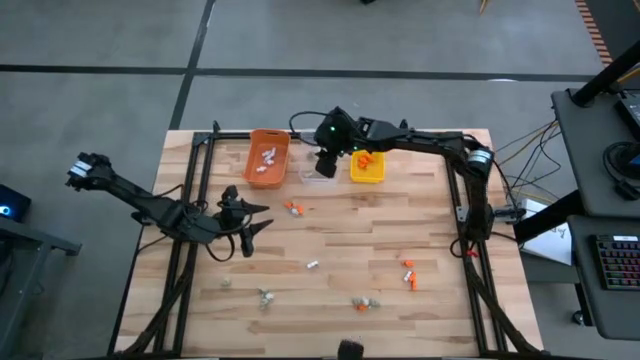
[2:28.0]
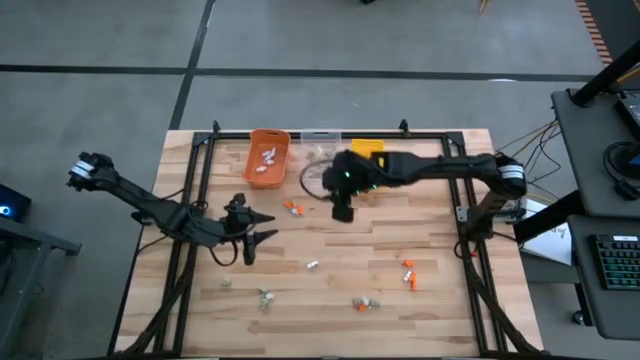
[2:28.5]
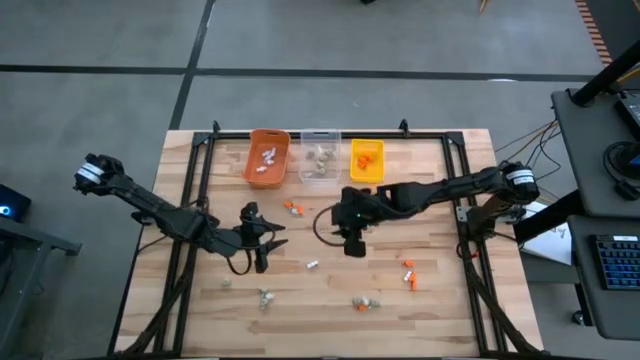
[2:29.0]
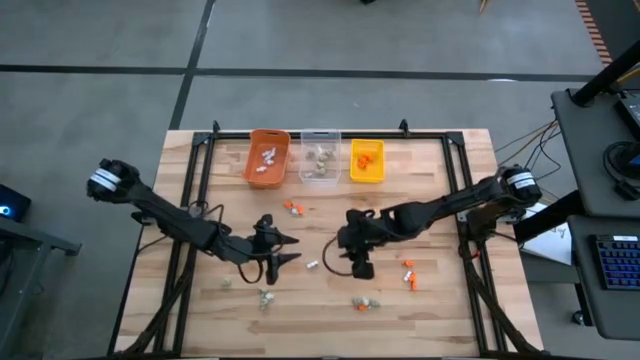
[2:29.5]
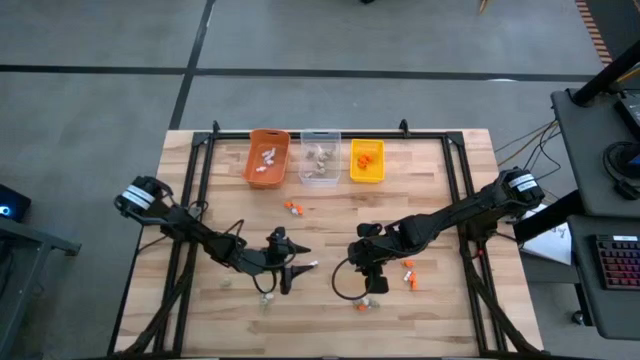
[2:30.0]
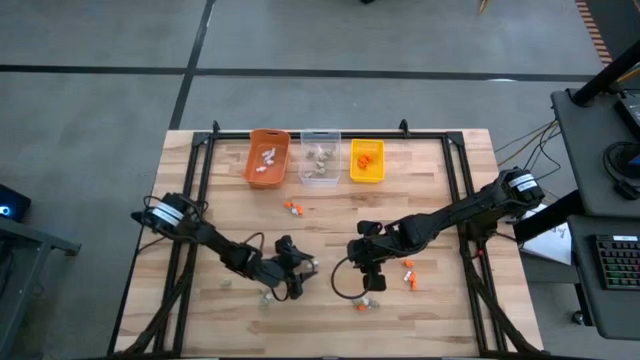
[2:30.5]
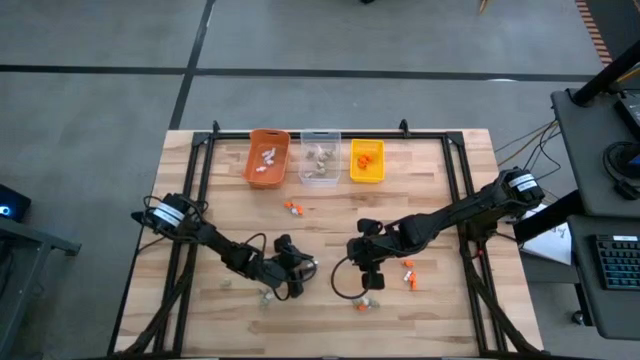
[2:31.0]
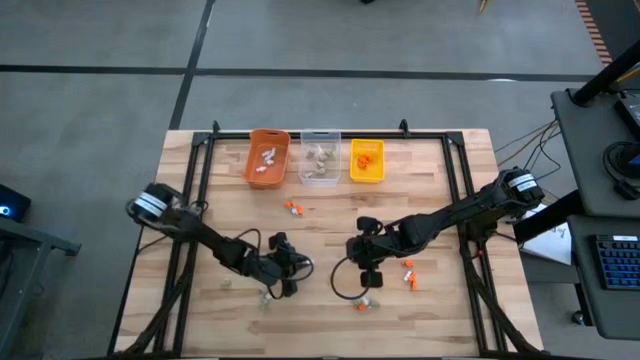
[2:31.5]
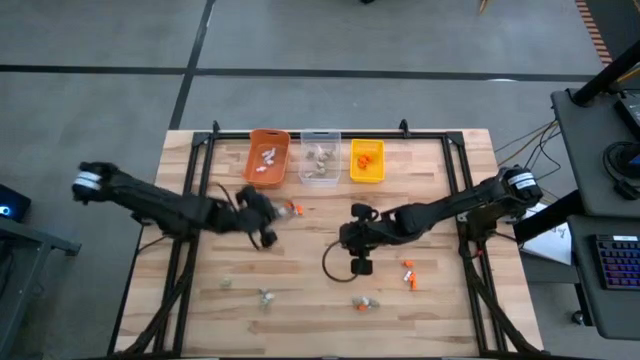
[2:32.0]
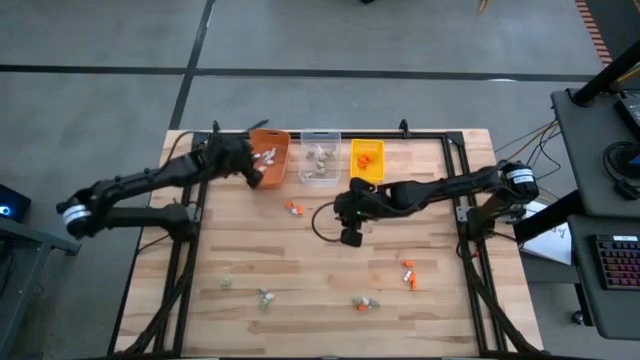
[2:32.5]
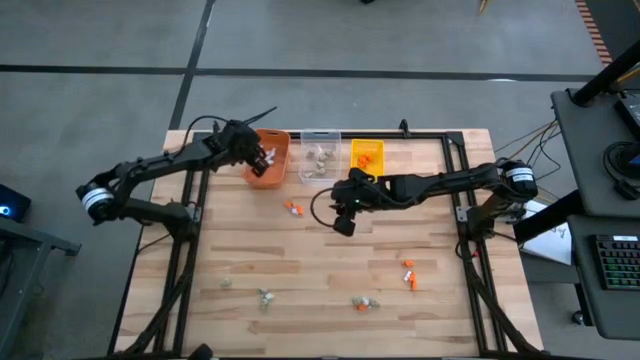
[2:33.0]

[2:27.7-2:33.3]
Task: Sort Halloween decoration
Put the white skeleton toy into the orange bin

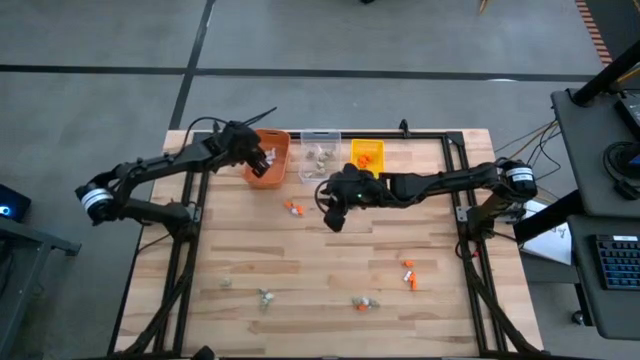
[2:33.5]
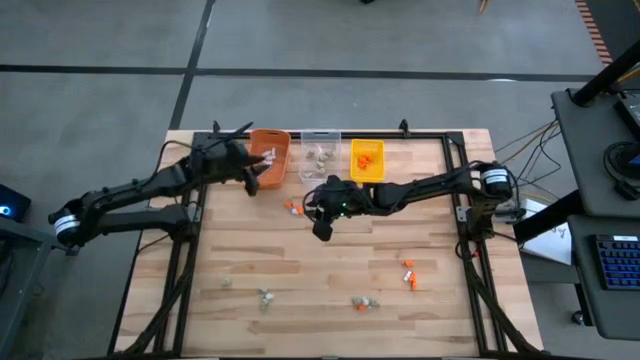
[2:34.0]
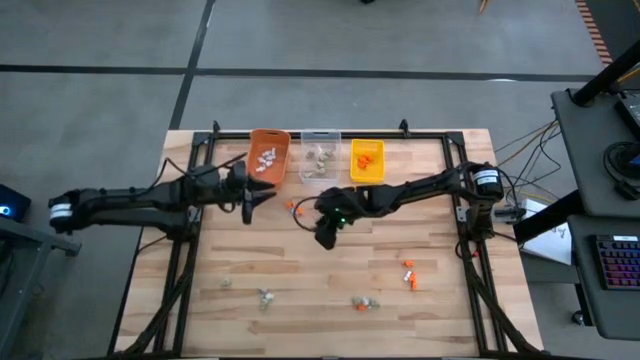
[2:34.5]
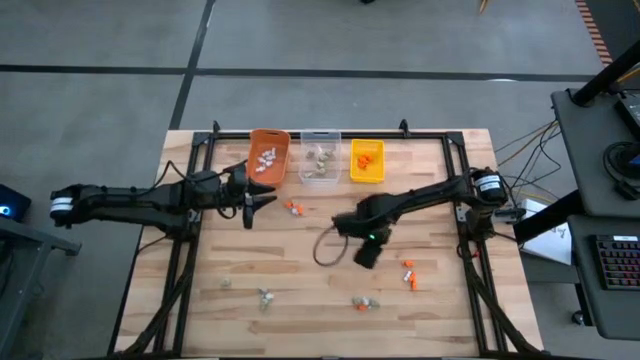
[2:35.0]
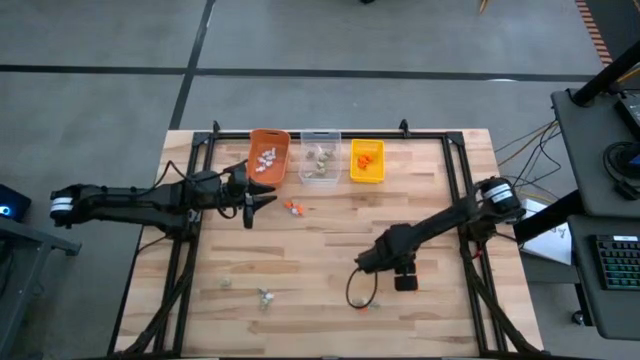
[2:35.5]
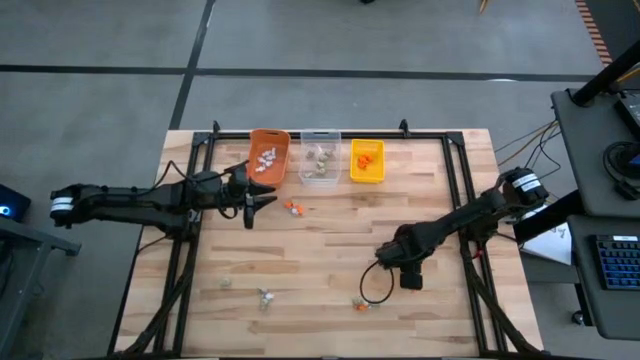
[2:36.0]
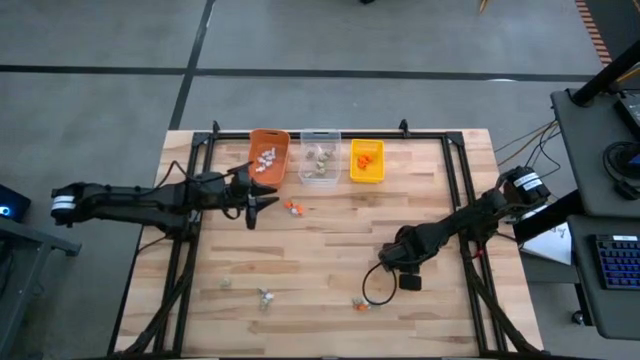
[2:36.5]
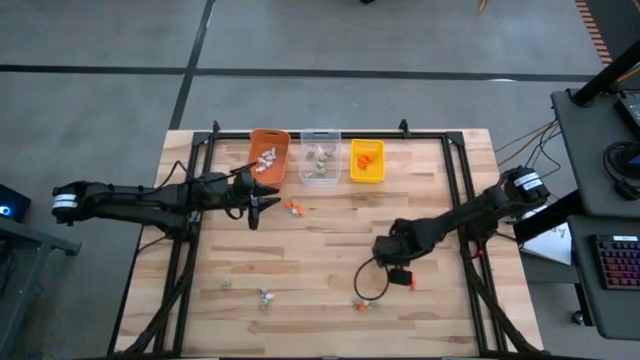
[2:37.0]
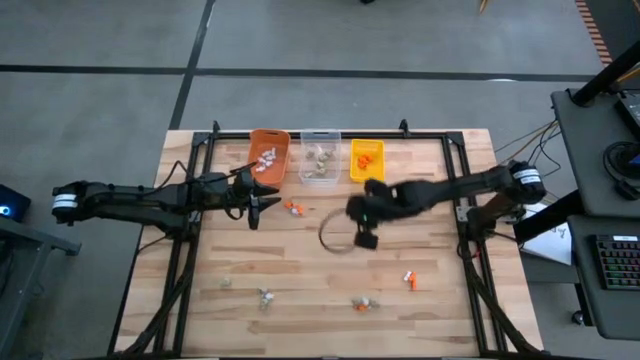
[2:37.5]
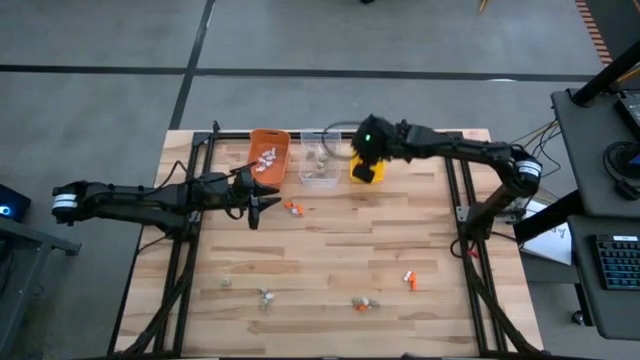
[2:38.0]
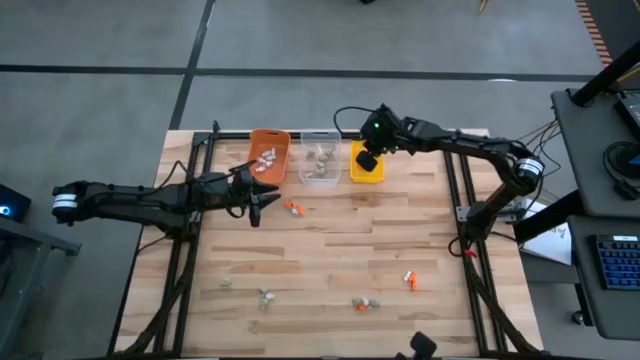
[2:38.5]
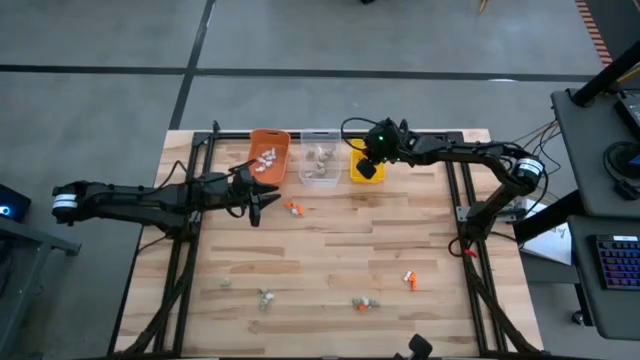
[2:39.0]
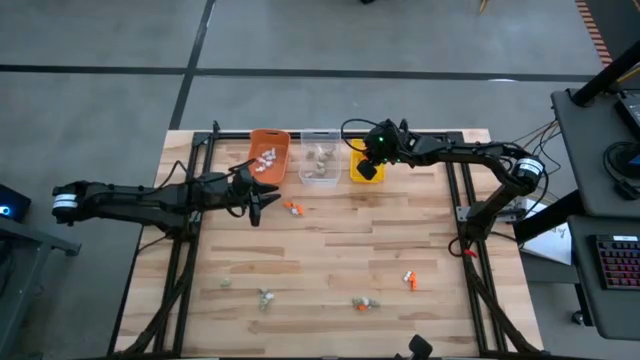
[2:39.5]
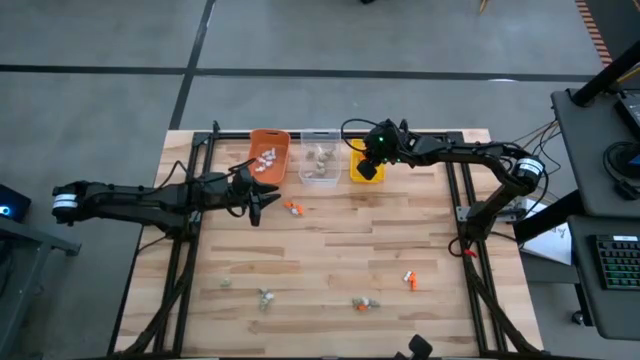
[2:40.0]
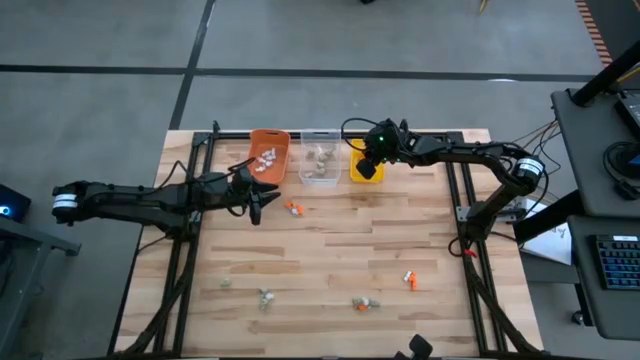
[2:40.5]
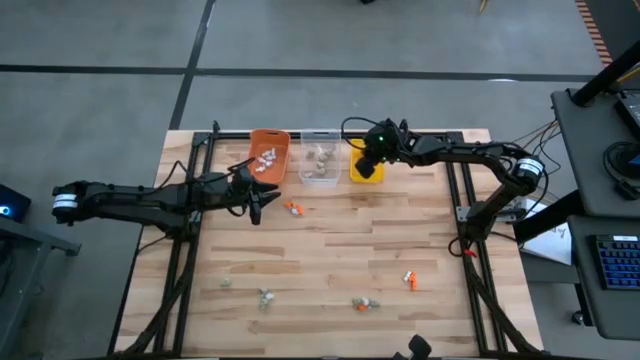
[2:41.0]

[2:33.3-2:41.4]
Put the orange skeleton toy into the yellow bin

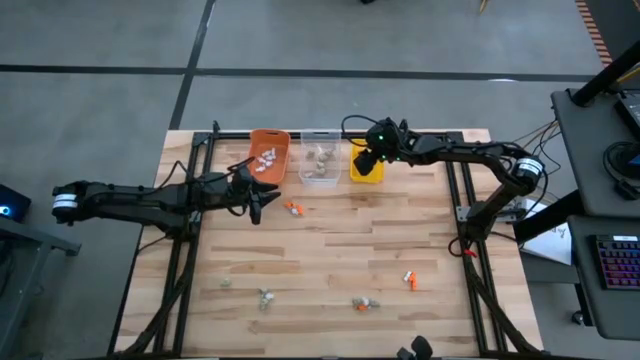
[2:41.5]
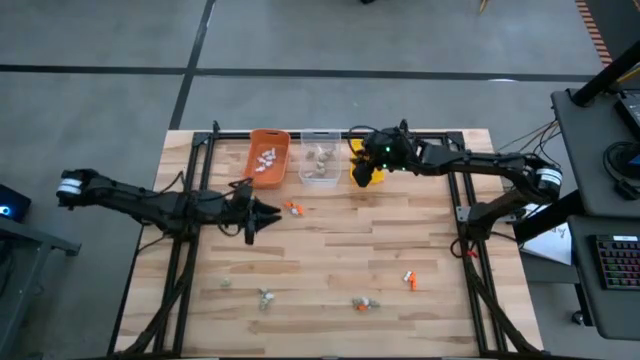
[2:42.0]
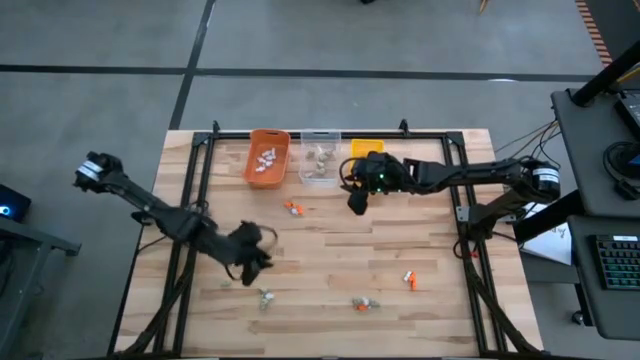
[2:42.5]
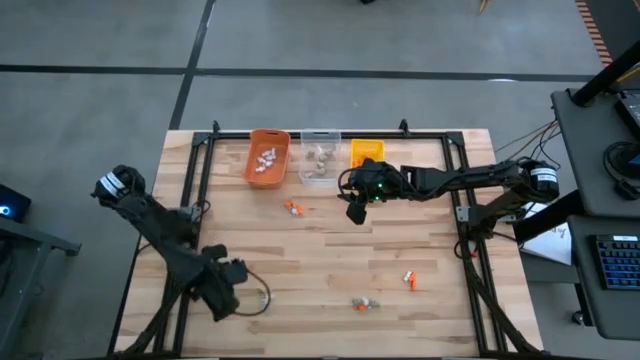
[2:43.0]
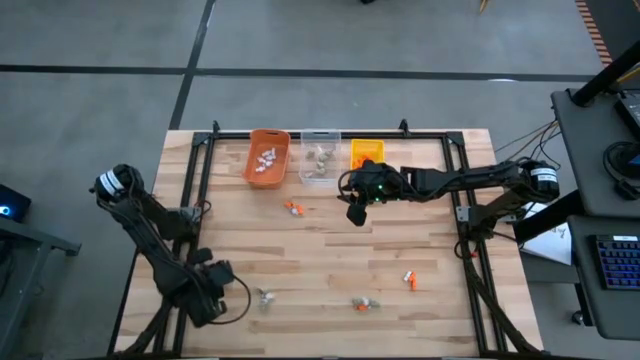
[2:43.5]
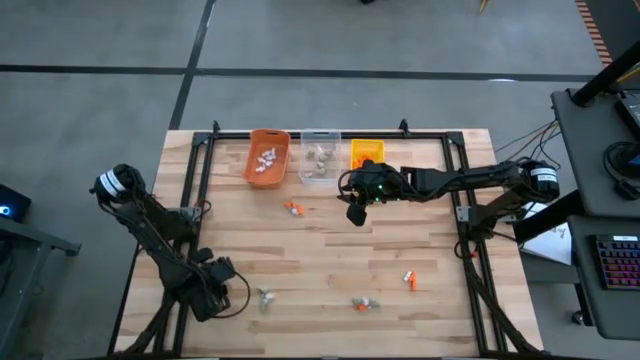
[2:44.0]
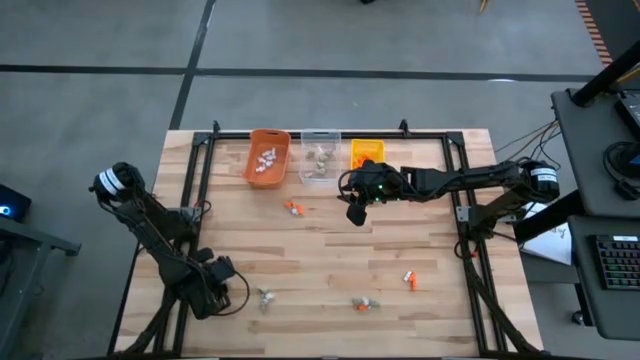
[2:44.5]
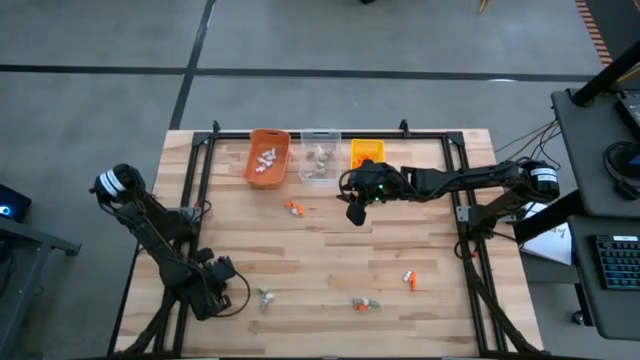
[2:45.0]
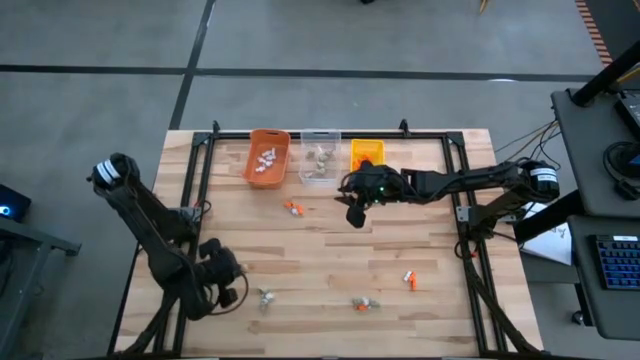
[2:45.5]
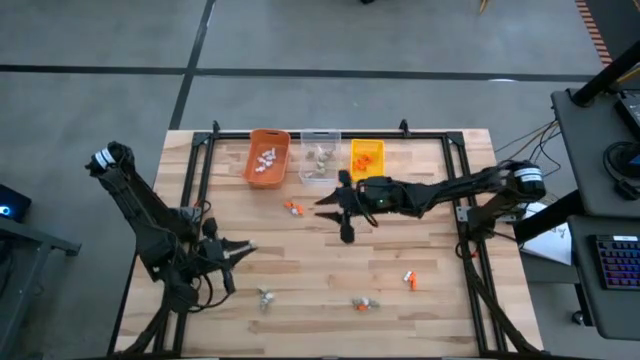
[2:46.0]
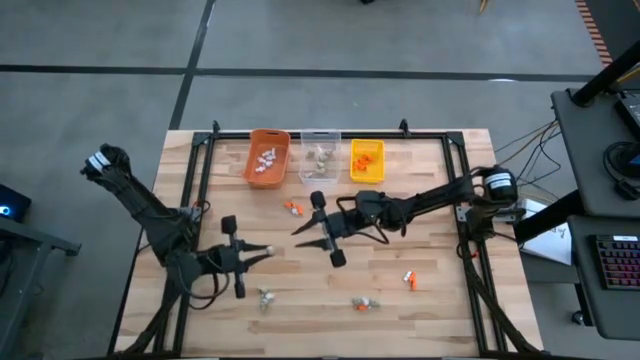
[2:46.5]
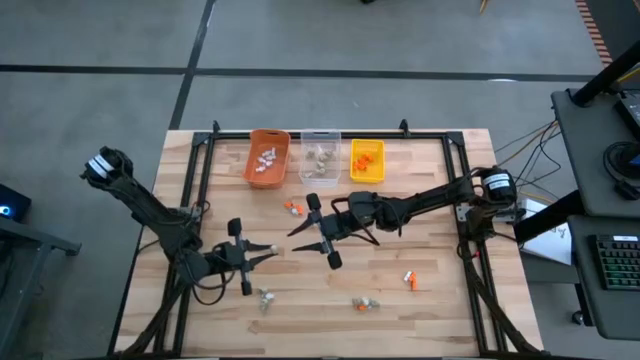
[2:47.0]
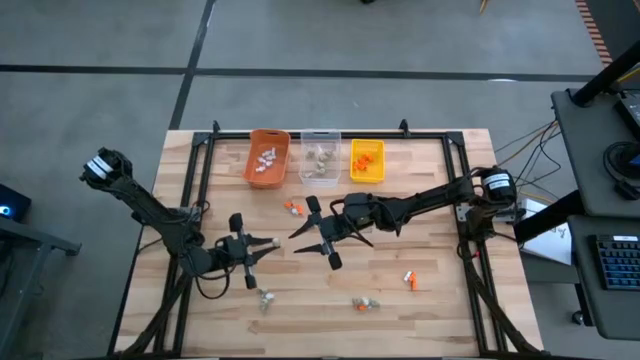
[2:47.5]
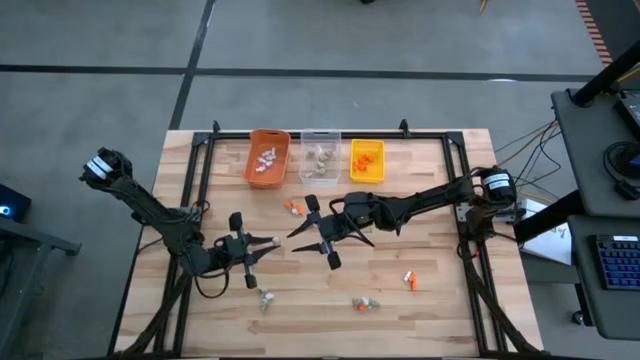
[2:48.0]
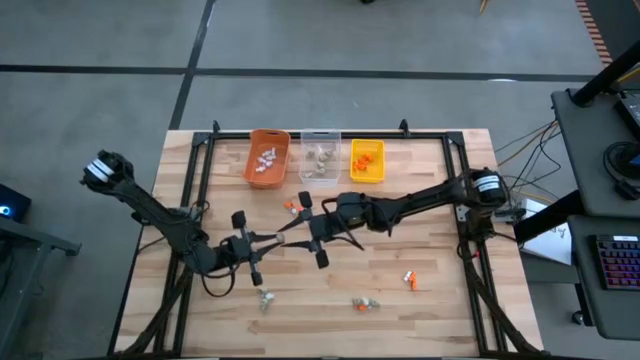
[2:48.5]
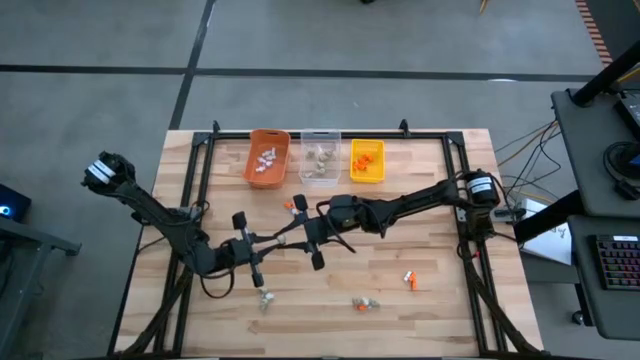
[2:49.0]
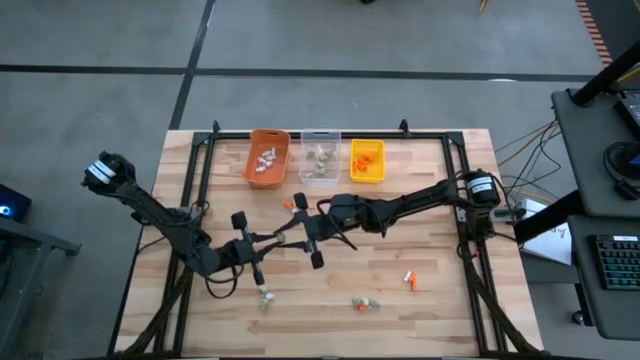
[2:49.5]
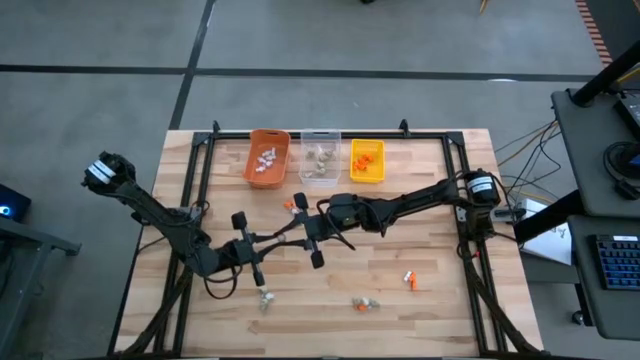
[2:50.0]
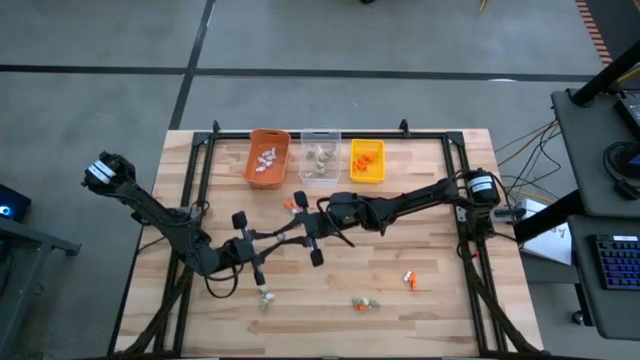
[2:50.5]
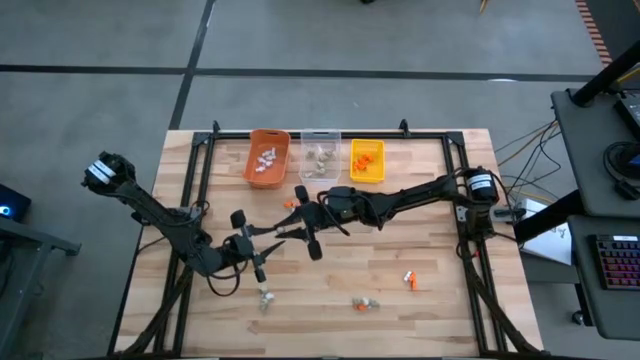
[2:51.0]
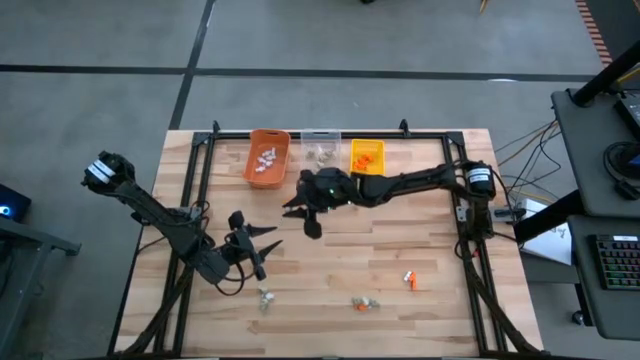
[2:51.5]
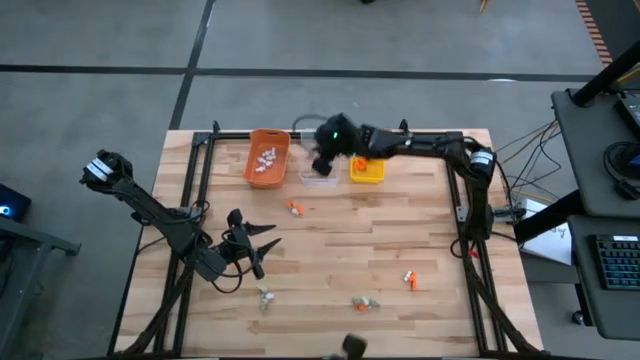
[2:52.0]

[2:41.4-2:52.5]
Put the gray skull toy into the transparent bin
